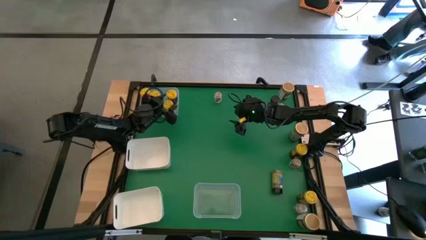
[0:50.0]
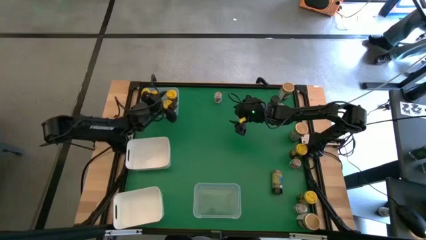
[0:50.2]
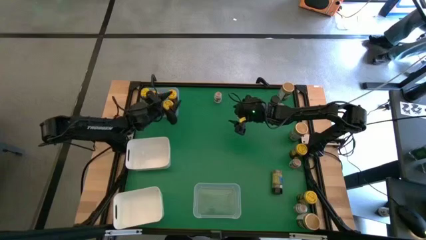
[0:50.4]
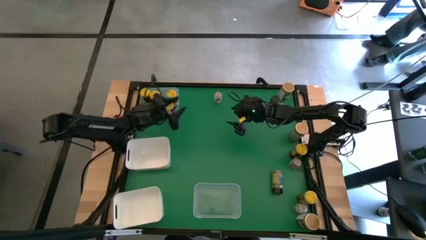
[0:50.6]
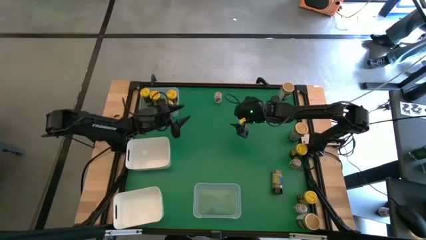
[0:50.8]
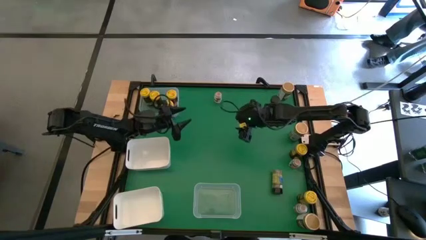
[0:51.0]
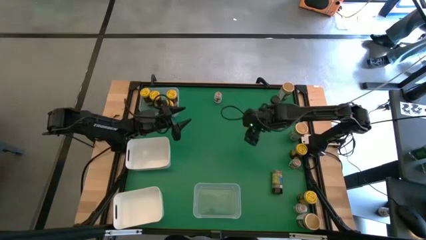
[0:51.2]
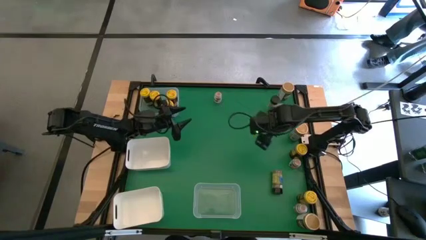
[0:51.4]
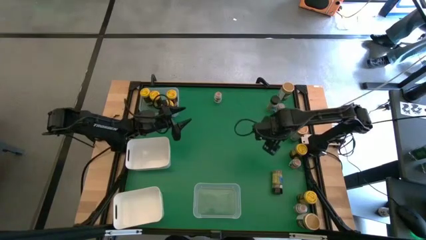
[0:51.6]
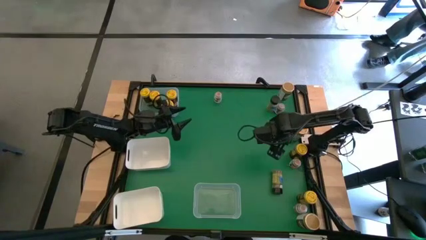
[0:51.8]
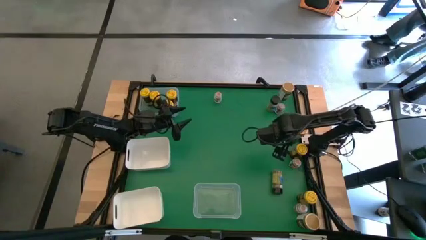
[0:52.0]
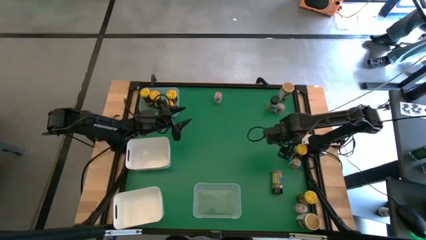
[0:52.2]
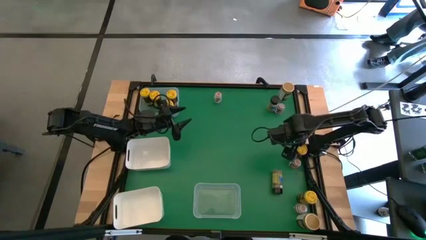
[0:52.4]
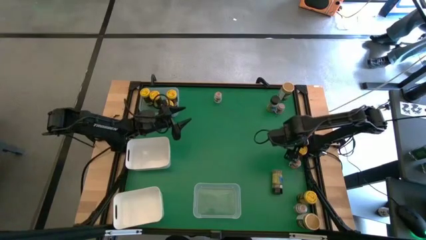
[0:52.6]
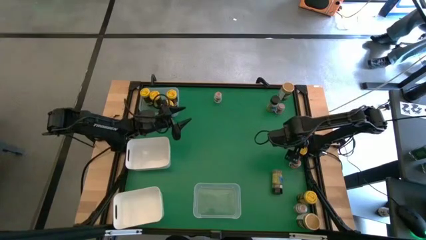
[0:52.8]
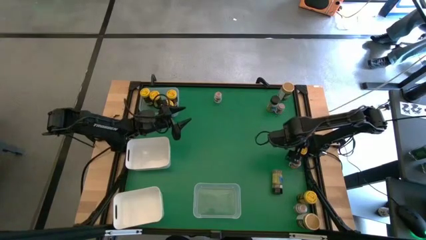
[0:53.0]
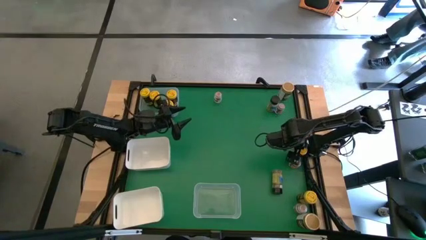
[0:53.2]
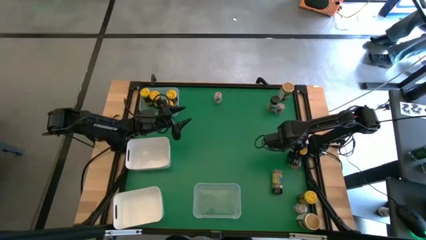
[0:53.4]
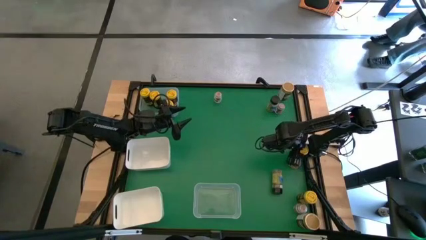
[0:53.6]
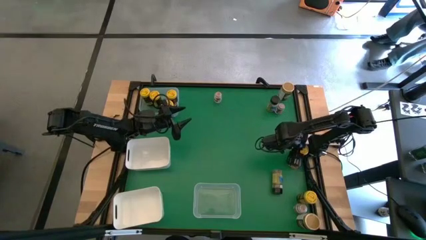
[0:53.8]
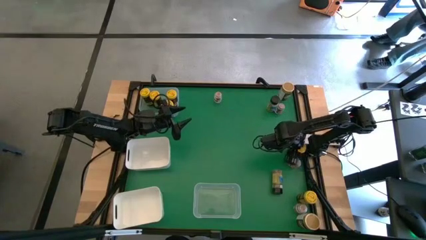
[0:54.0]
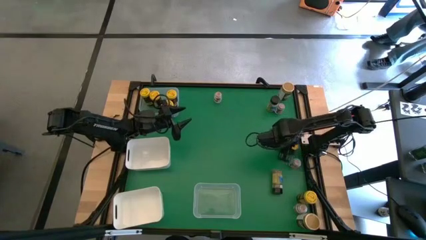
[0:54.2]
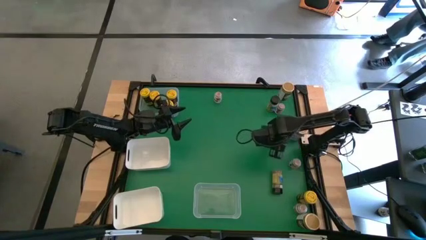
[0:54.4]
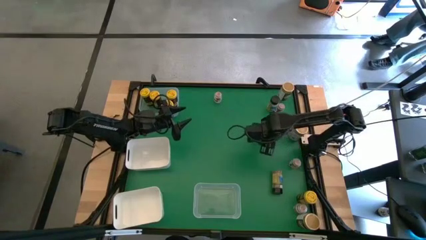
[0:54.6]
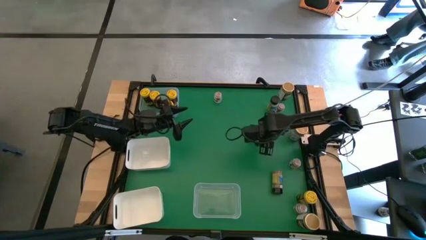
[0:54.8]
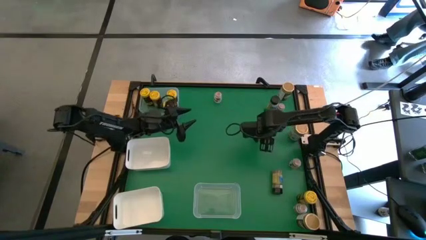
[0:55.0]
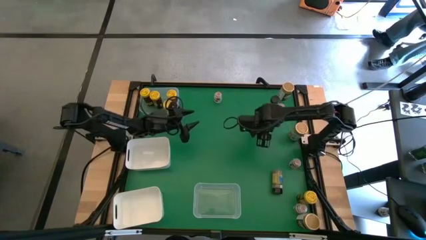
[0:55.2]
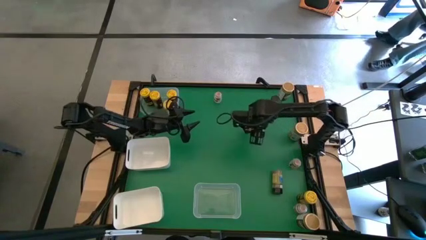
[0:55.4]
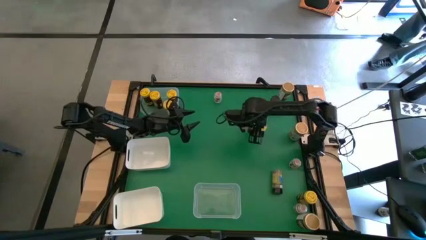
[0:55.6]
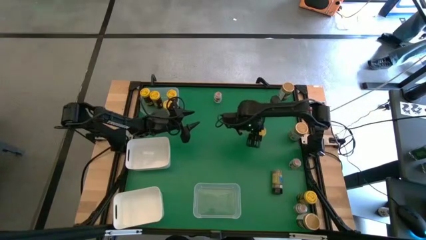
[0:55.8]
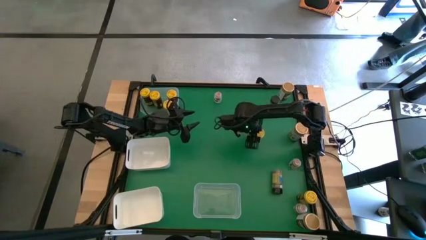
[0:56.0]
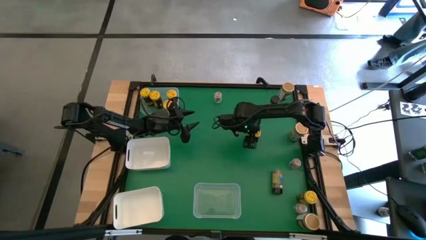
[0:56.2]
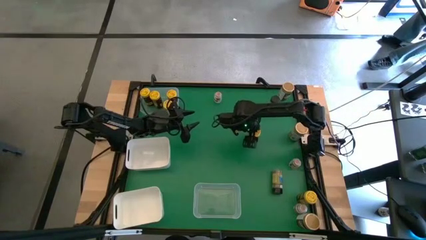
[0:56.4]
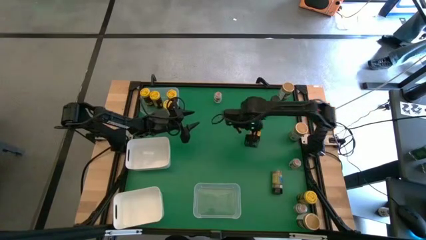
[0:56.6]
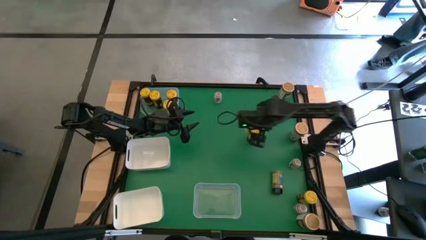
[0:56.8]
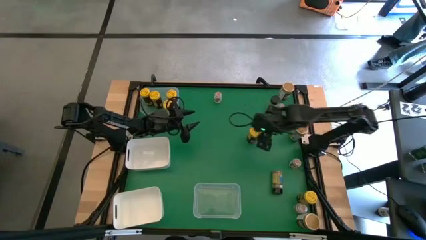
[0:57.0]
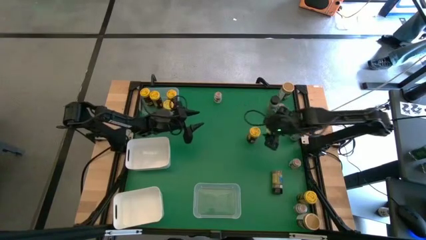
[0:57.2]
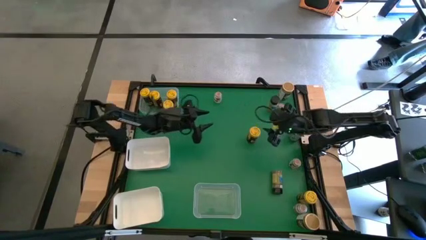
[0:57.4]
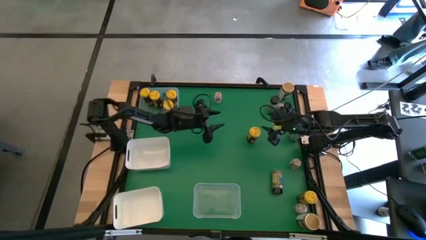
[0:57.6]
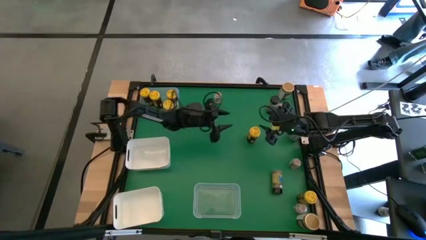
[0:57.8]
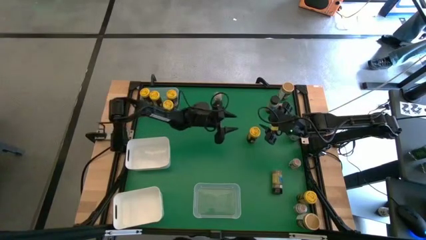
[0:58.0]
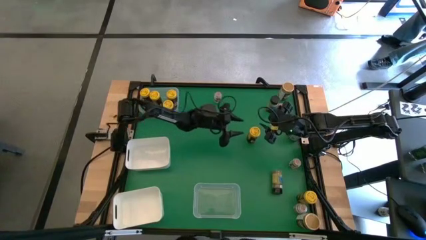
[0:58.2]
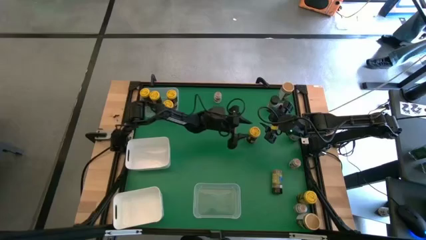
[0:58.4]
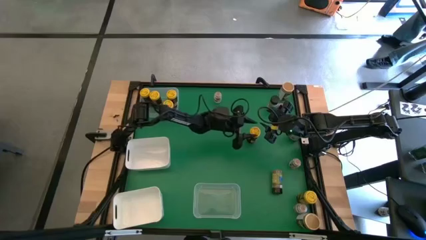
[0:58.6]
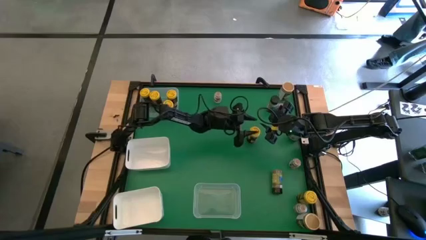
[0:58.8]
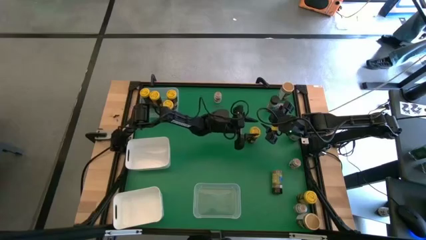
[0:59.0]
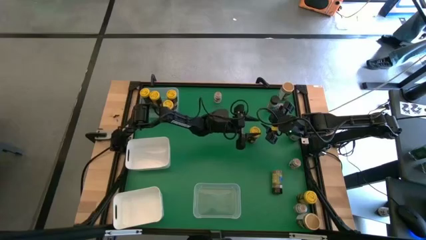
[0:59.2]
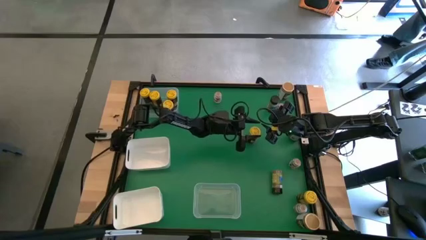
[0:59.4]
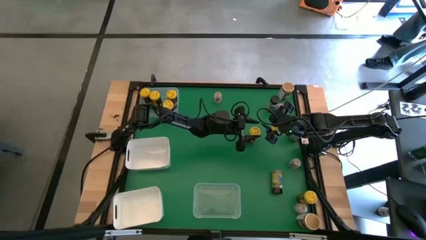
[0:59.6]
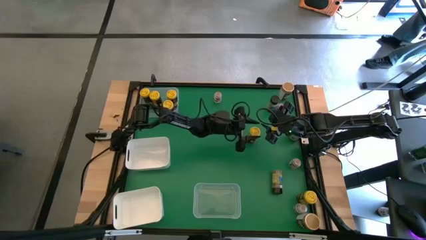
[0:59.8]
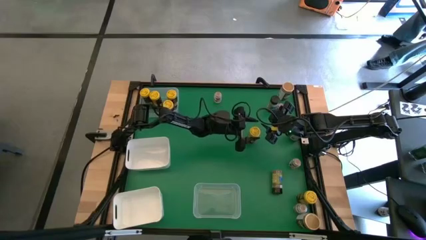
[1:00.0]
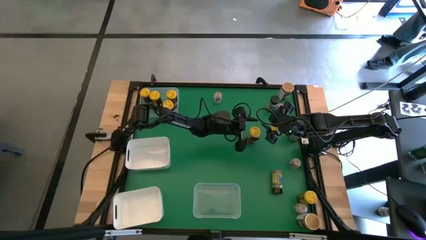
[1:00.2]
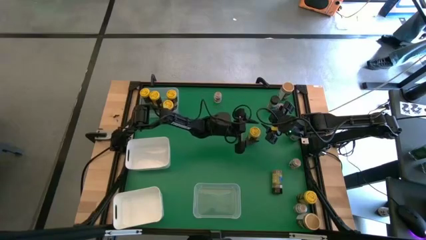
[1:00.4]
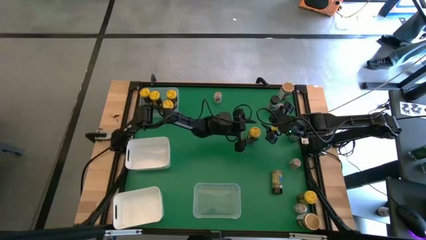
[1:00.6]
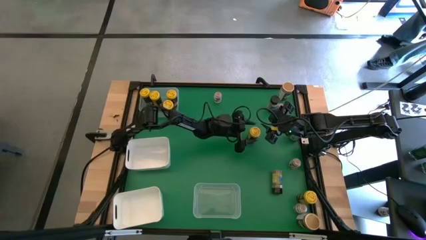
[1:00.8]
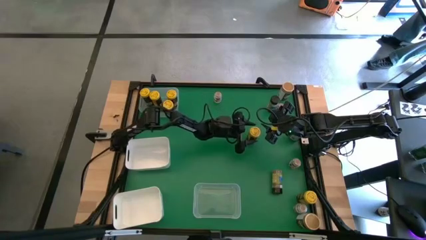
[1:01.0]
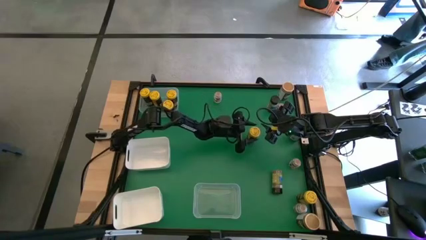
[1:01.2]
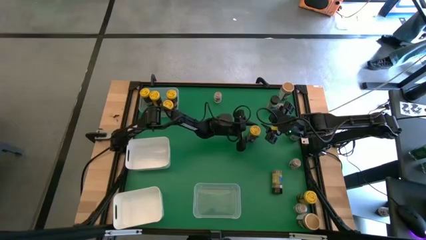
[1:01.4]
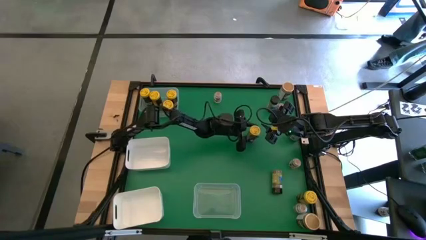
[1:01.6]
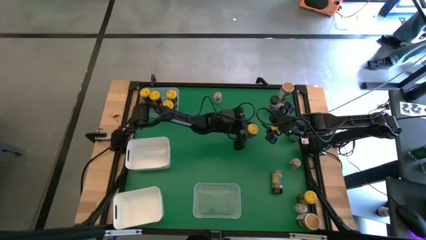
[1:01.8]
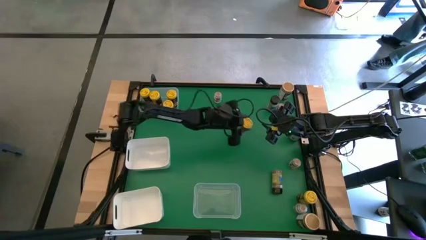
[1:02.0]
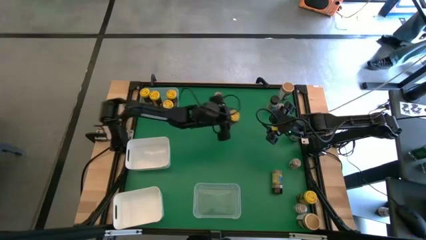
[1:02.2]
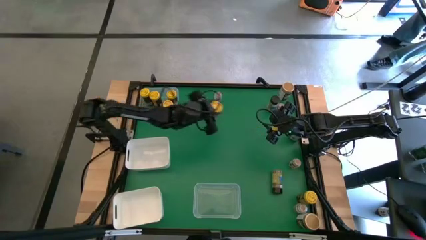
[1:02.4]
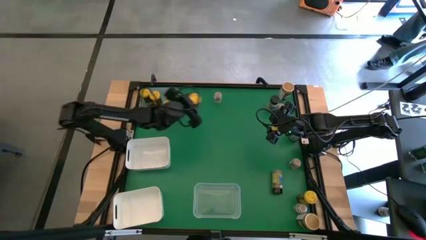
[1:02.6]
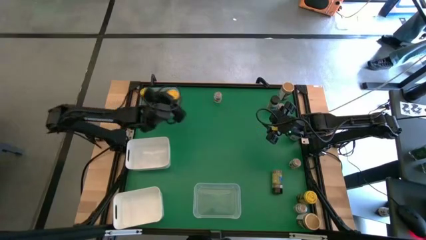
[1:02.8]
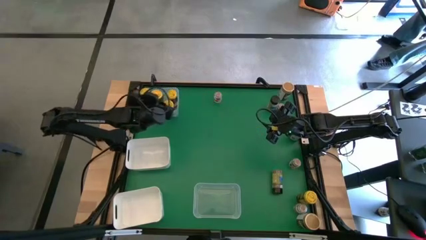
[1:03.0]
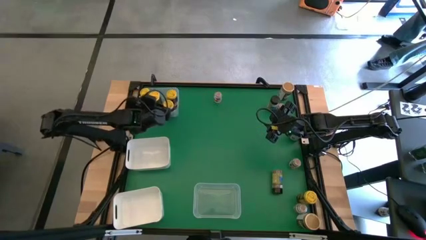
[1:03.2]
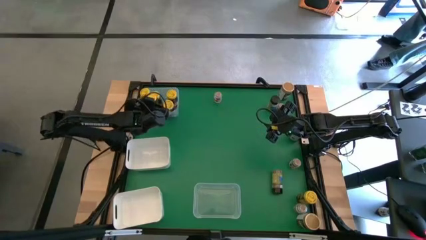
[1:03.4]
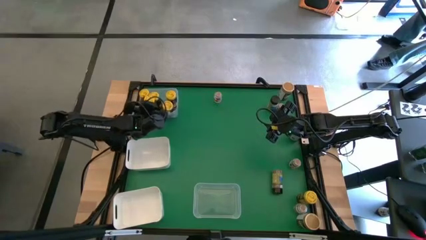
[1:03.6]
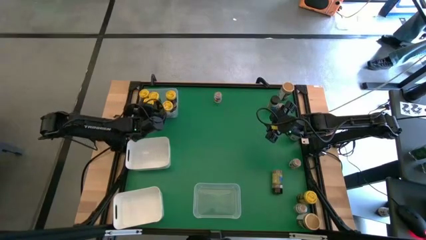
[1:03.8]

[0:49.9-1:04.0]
Task: Sort spices by type
Put the yellow spice bottle into the top transparent bin

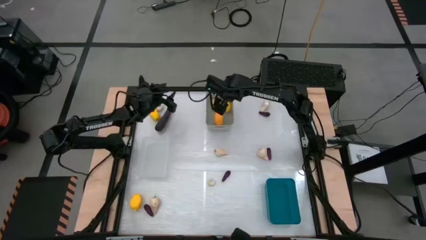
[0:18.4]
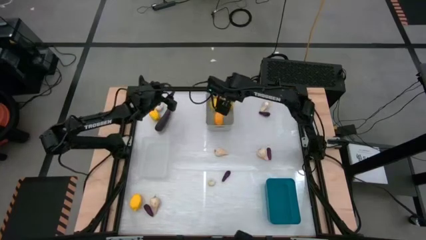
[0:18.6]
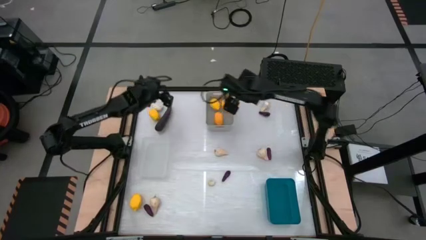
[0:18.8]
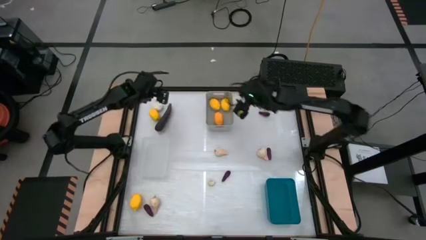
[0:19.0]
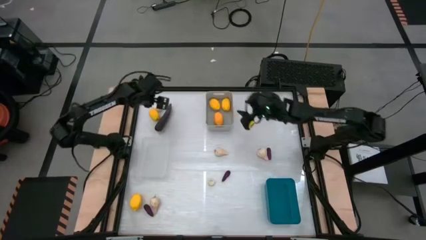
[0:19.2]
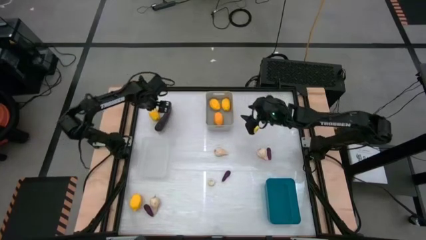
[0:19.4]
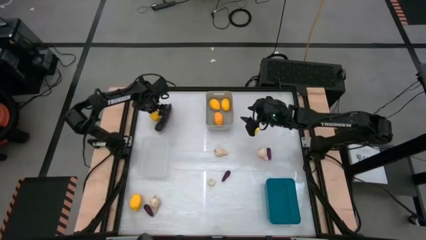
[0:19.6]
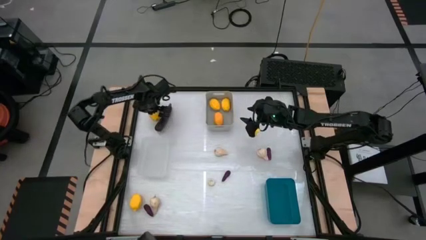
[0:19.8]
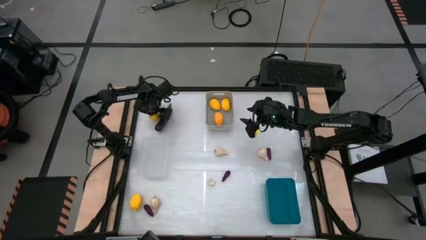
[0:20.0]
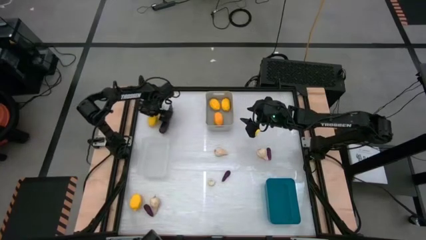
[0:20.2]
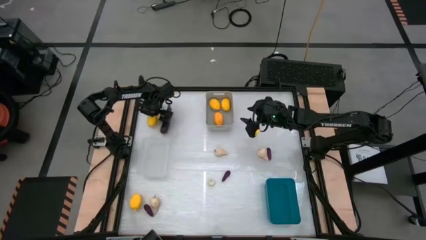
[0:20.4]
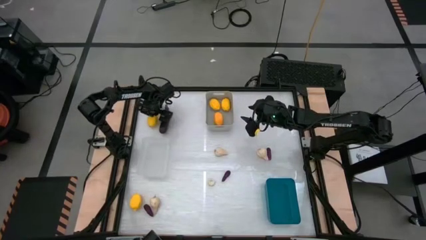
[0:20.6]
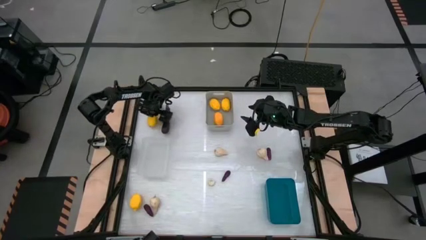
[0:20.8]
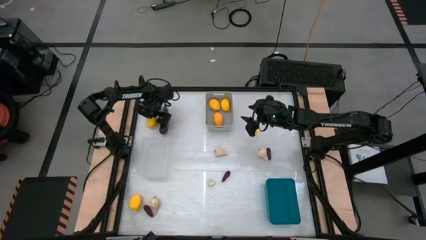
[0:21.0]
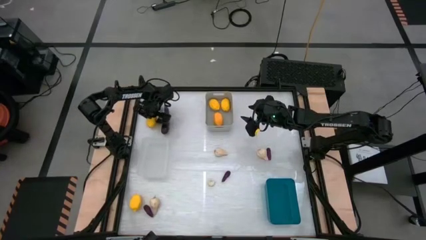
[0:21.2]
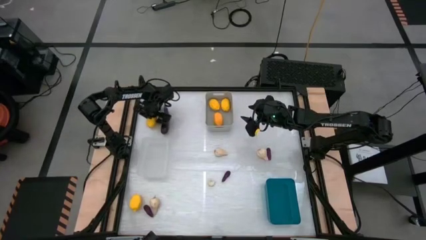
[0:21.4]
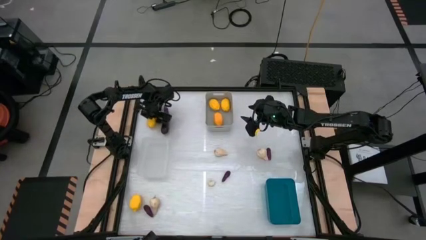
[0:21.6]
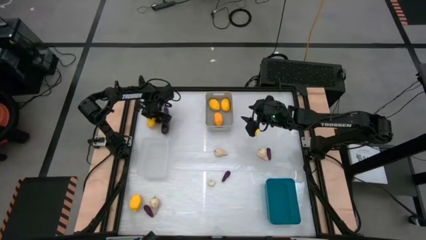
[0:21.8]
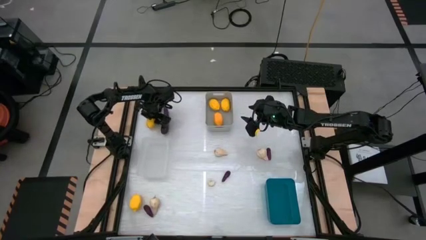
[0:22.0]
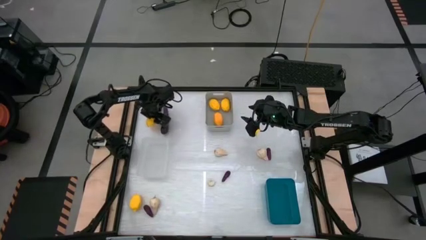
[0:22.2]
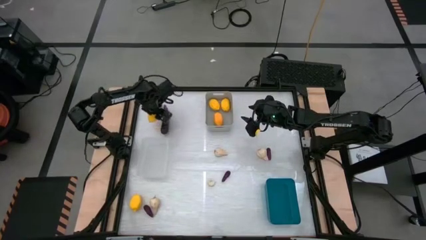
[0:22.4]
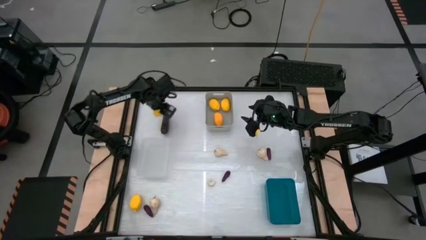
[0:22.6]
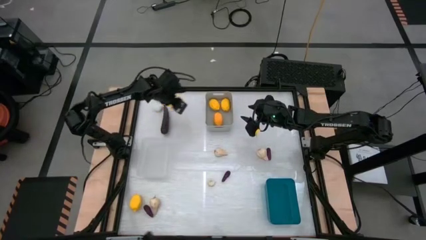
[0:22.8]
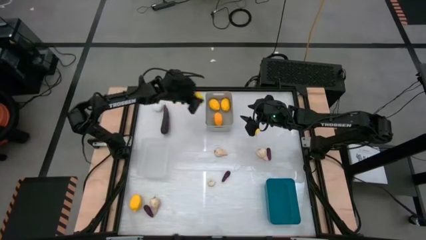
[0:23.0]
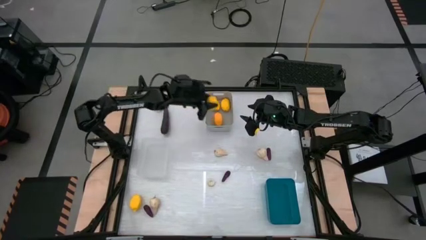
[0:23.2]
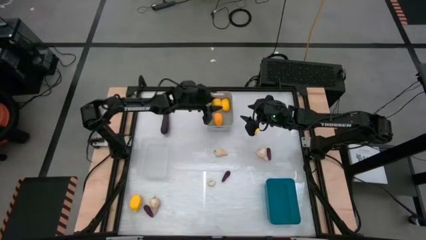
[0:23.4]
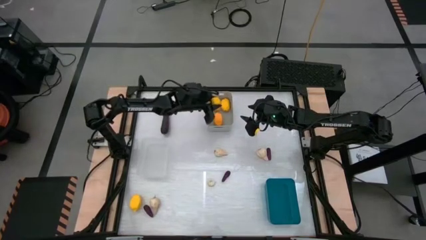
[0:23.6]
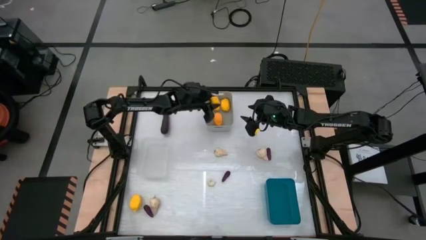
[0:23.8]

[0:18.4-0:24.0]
Task: Sort produce into baskets
Put the lemon into the gray bin
